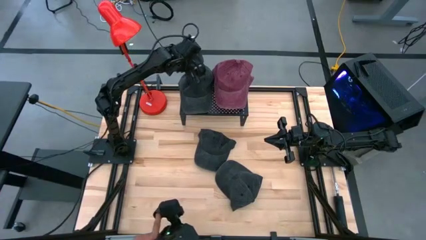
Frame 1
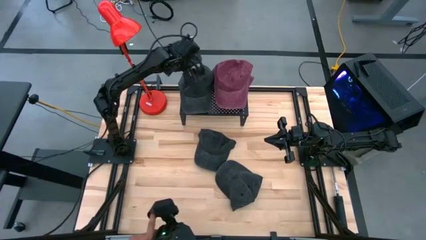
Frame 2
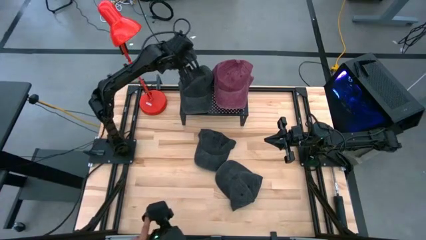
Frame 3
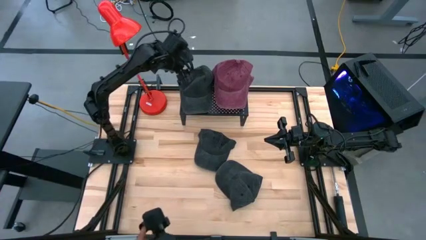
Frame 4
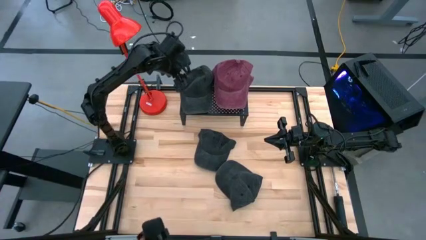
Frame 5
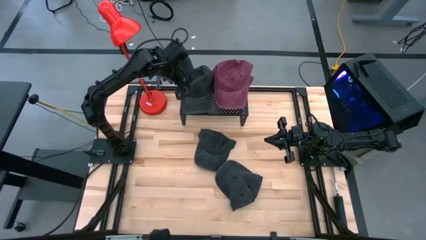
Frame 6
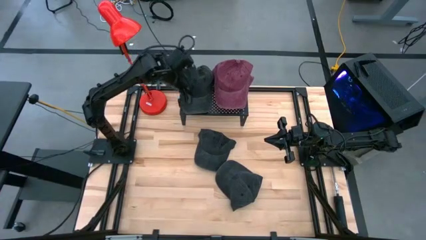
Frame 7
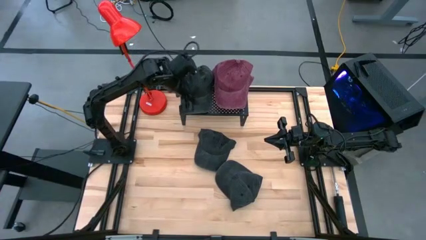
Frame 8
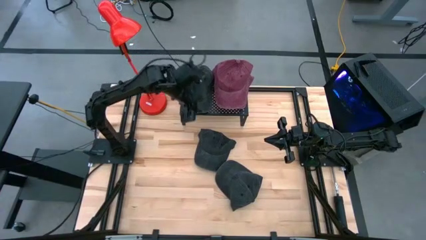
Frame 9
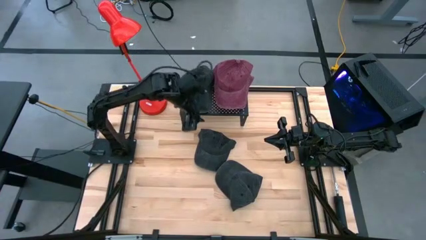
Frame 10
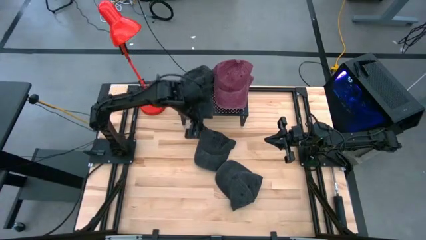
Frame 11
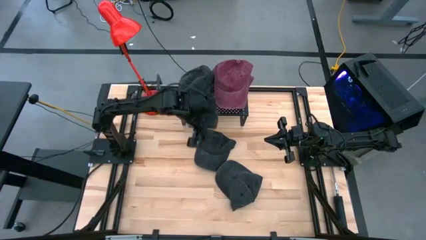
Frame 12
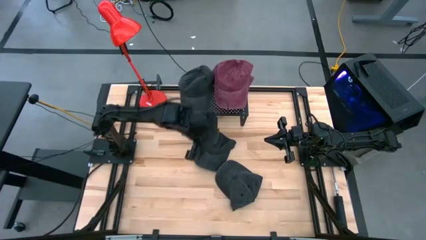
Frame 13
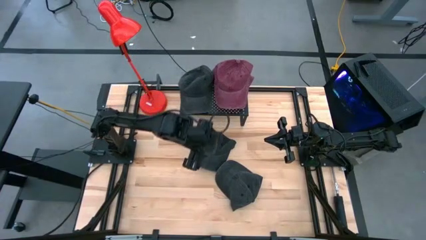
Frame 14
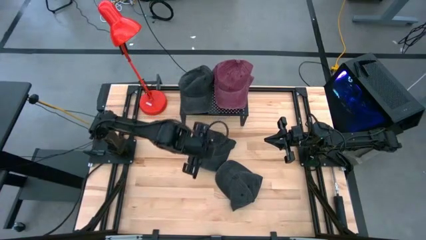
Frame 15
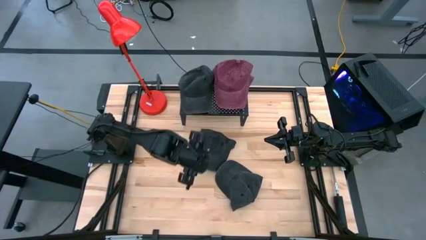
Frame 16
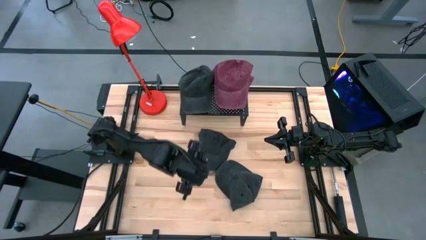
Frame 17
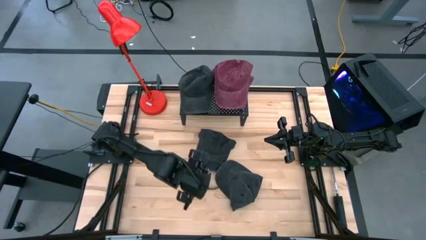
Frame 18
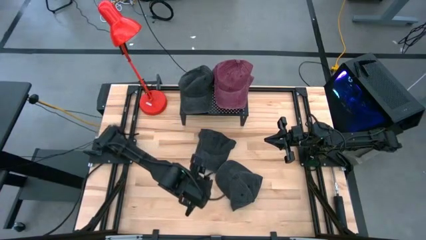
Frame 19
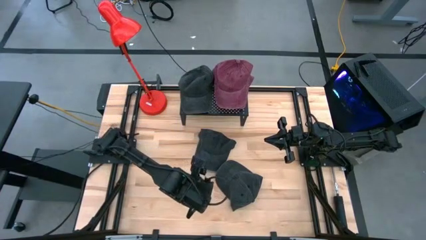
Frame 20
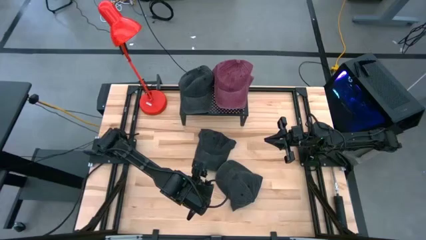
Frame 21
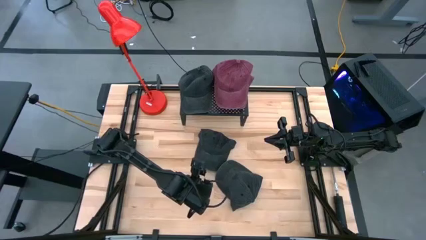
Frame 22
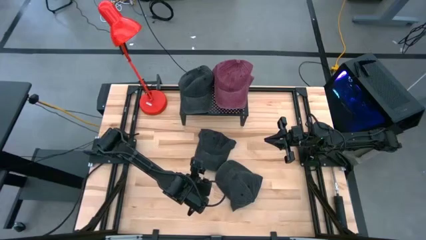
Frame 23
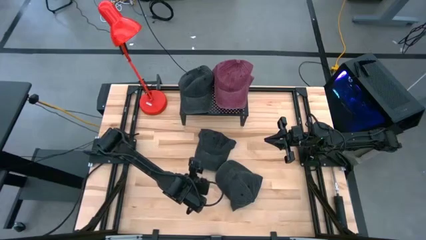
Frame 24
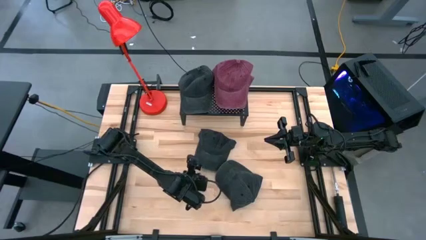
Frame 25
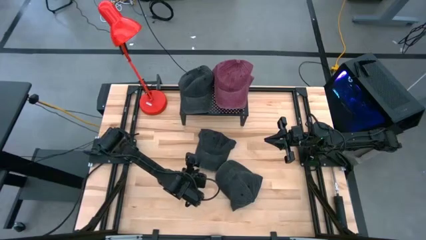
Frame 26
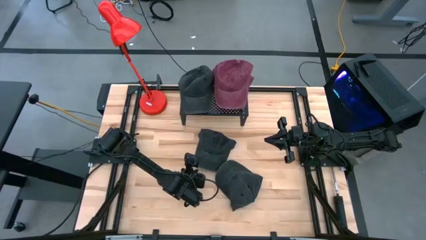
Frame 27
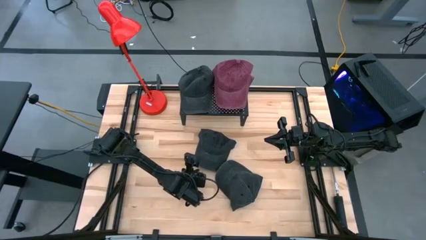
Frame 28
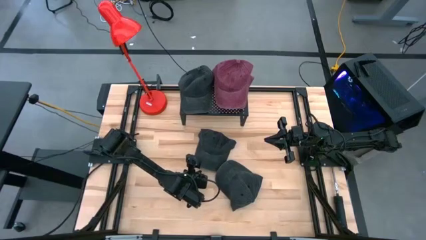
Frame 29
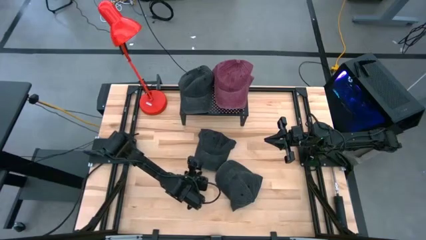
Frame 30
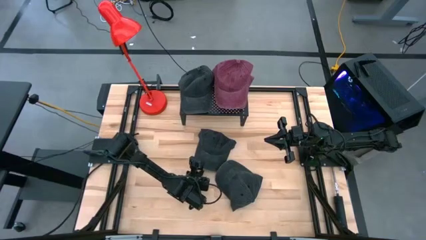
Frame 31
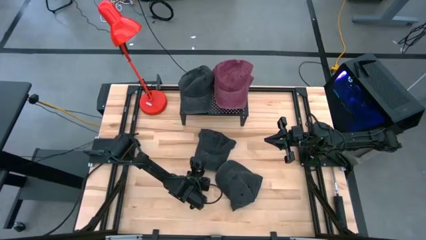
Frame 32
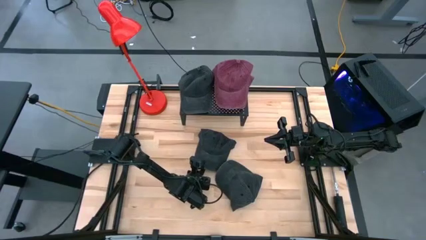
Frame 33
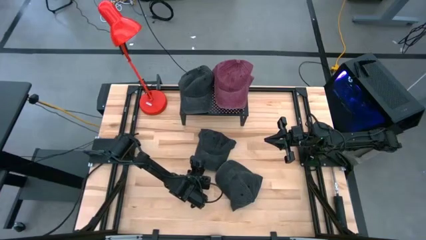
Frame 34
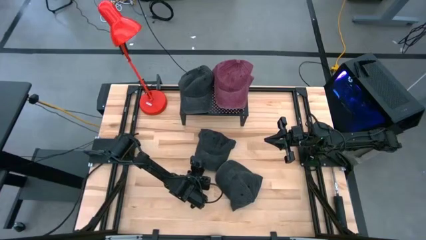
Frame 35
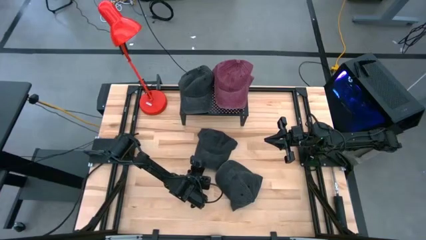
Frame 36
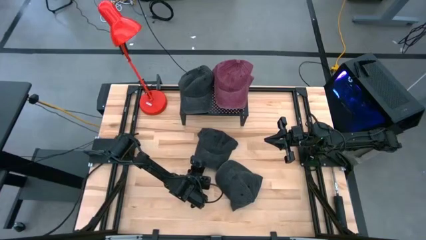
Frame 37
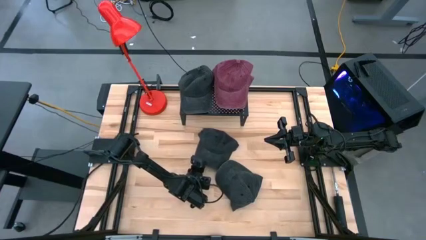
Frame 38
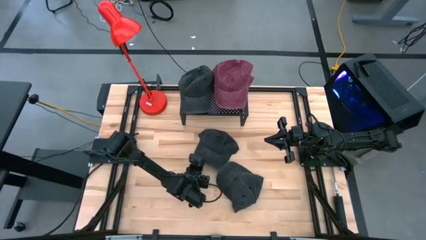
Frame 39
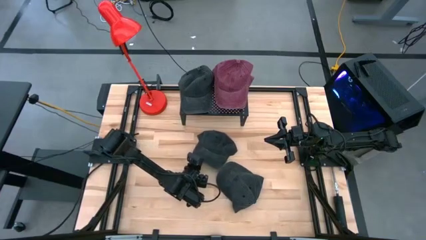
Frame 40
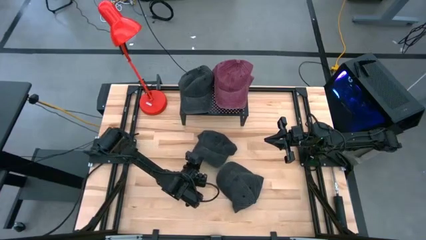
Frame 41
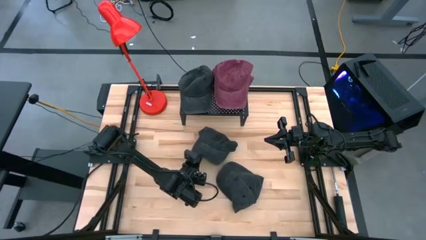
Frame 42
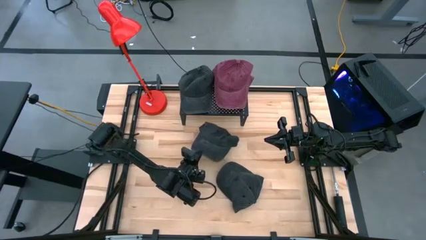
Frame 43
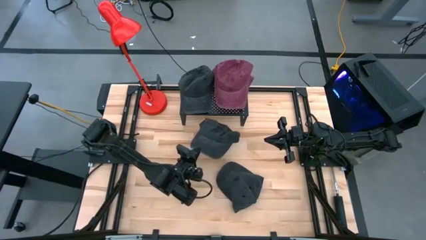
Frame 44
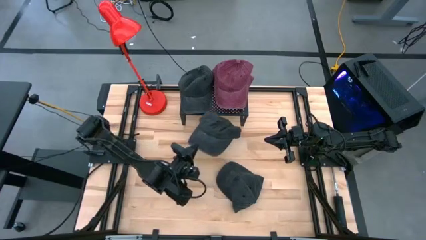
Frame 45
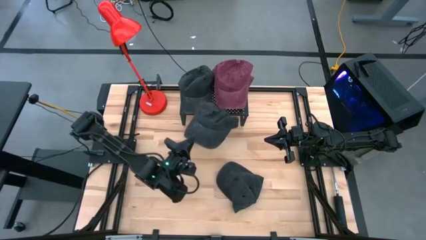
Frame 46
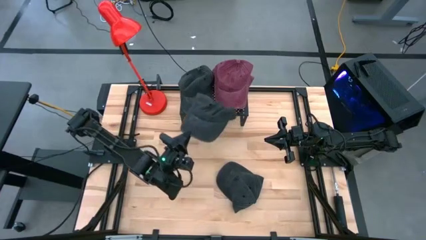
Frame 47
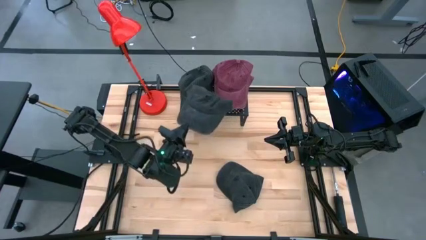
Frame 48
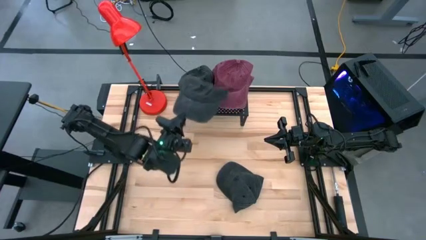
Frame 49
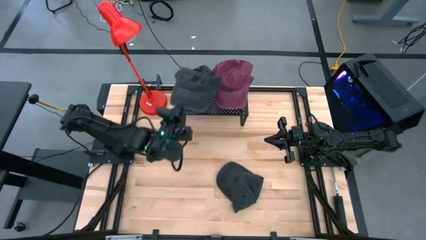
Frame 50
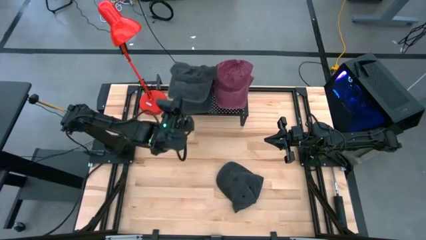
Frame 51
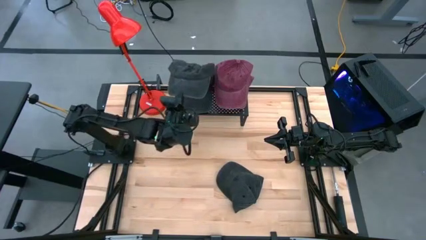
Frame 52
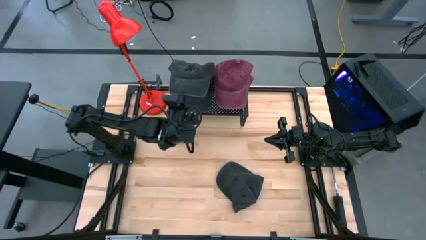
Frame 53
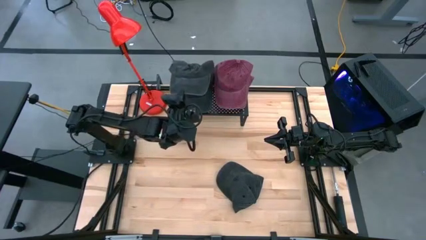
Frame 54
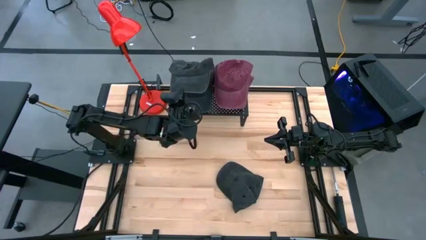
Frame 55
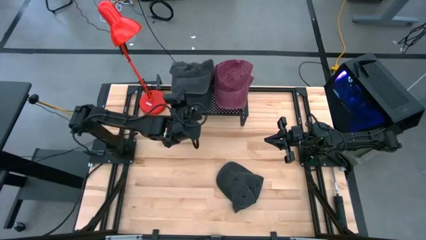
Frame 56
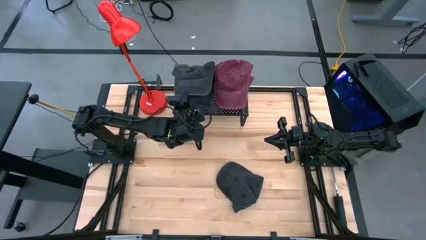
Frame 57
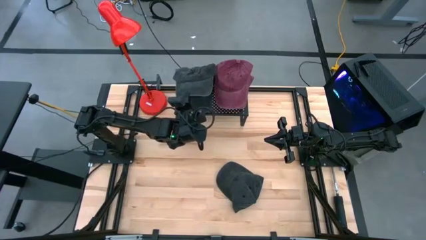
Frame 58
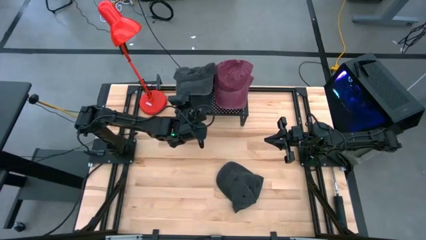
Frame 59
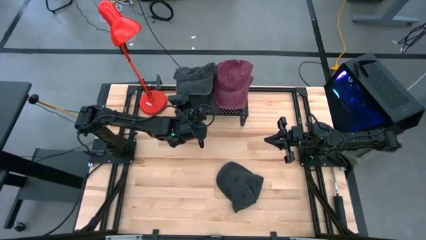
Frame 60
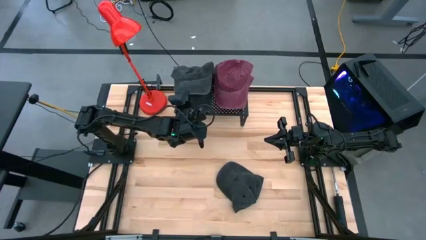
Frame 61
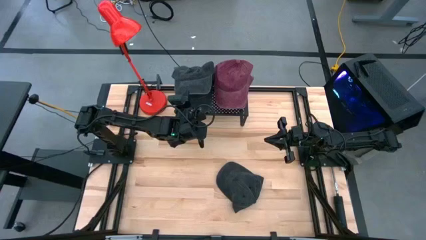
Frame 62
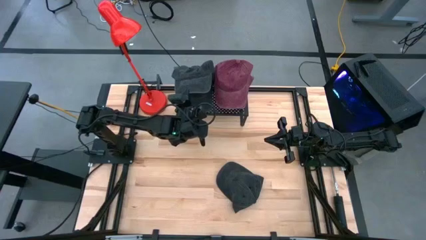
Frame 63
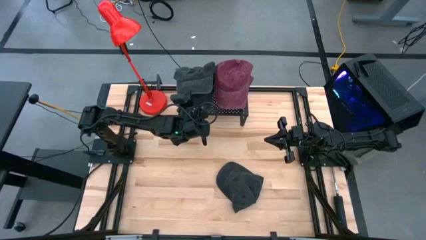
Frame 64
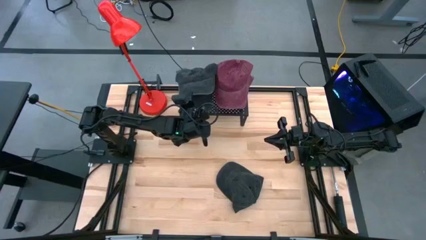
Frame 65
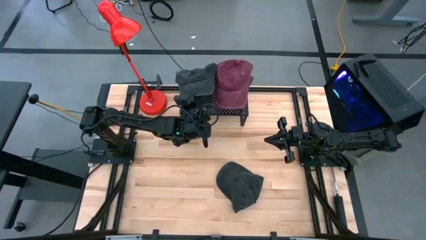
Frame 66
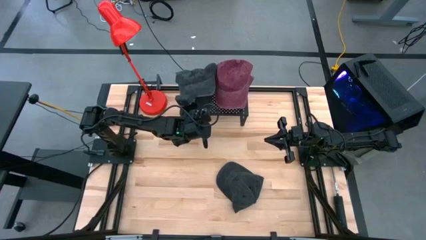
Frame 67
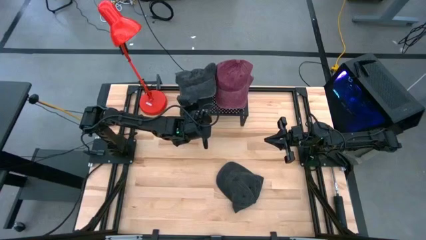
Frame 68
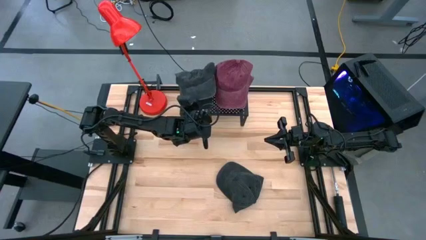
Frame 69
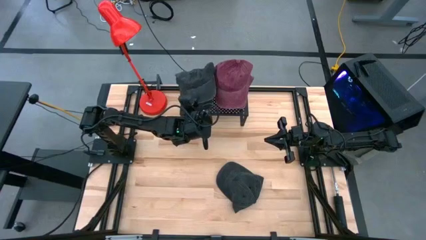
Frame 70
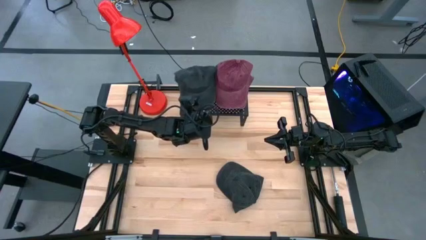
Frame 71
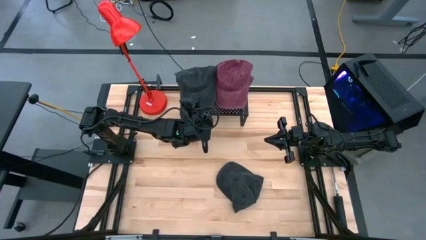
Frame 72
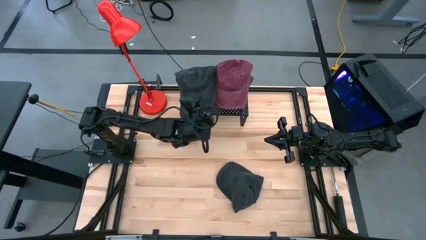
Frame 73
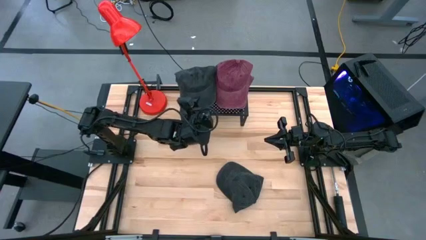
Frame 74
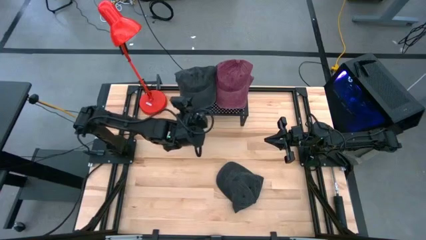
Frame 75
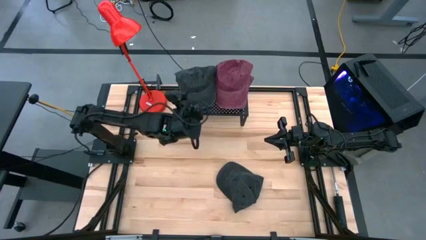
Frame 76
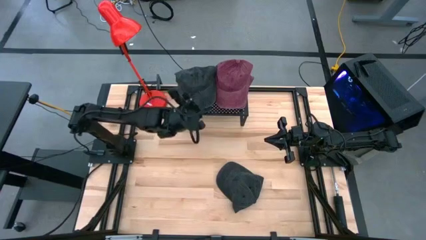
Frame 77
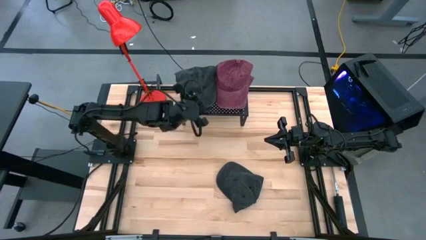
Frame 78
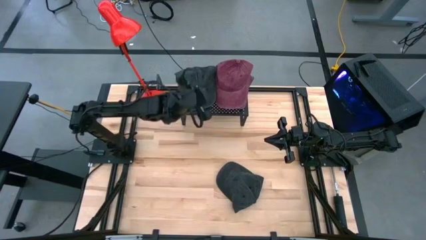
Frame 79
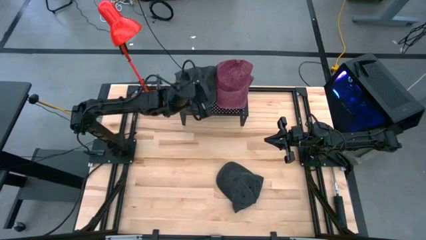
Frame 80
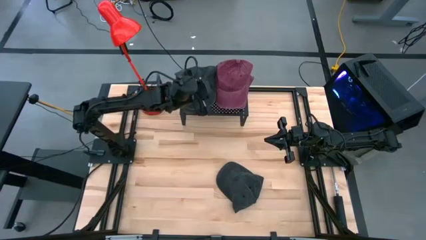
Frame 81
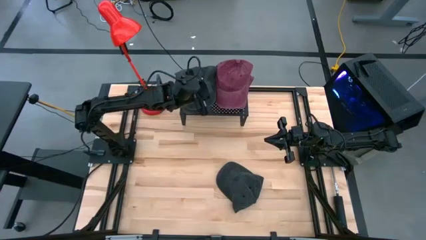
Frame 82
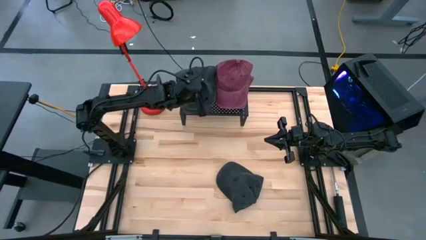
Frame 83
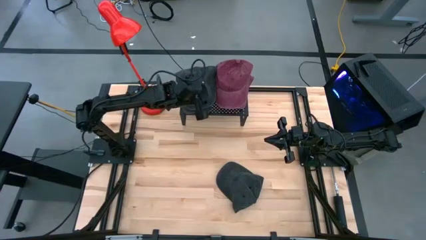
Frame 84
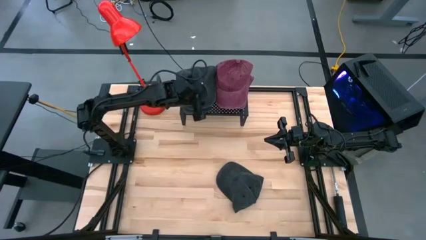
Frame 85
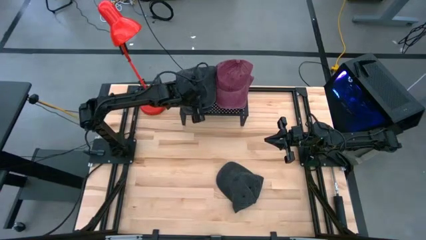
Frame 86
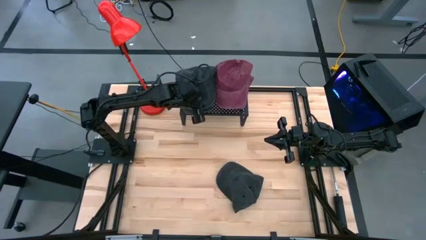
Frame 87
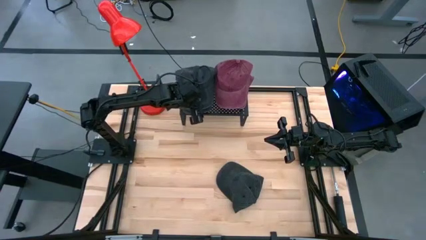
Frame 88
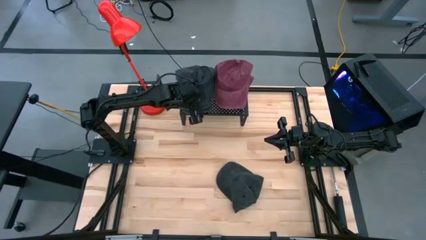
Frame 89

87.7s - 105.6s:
Task: Pick & Place hat
Stack the top black cap on top of the black cap on the shelf
